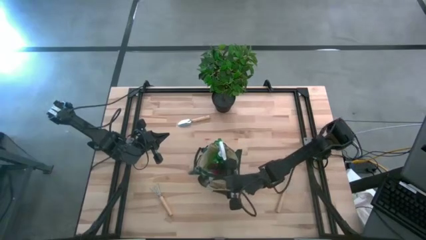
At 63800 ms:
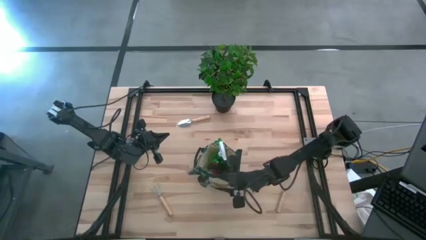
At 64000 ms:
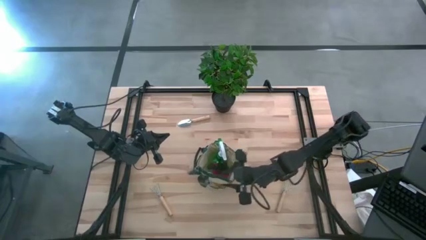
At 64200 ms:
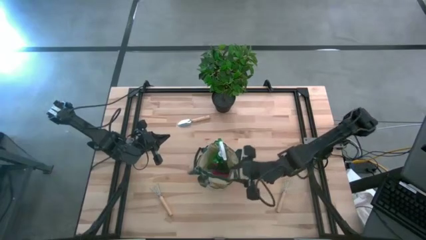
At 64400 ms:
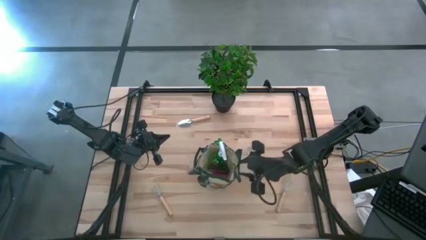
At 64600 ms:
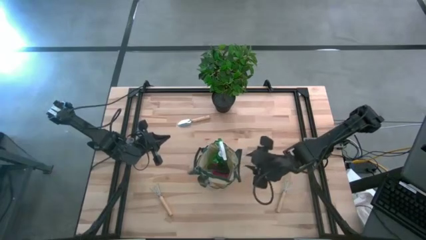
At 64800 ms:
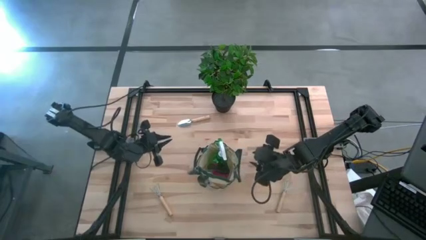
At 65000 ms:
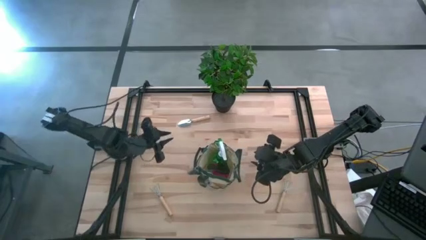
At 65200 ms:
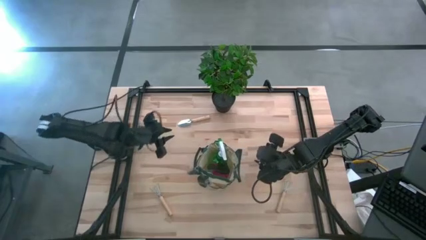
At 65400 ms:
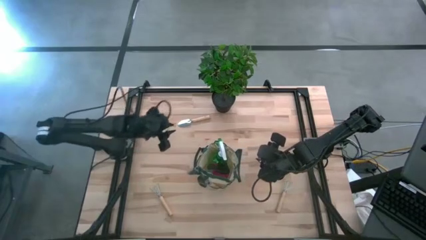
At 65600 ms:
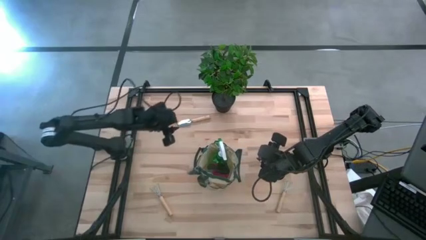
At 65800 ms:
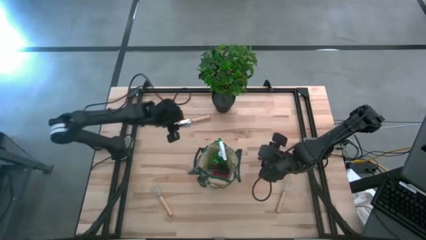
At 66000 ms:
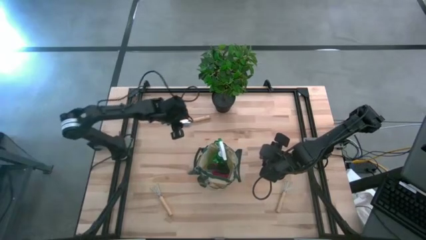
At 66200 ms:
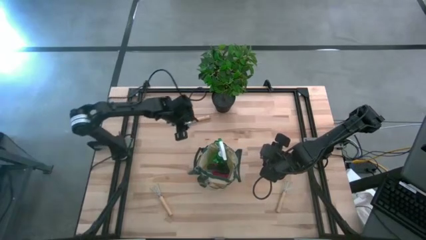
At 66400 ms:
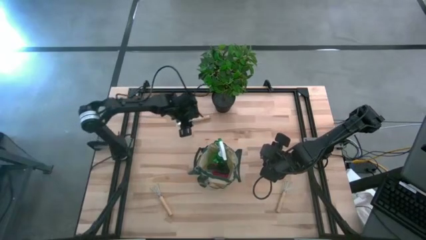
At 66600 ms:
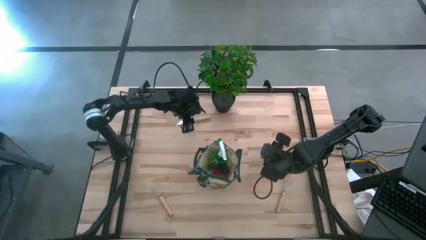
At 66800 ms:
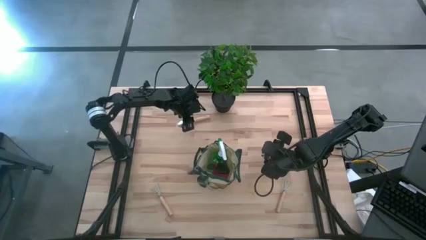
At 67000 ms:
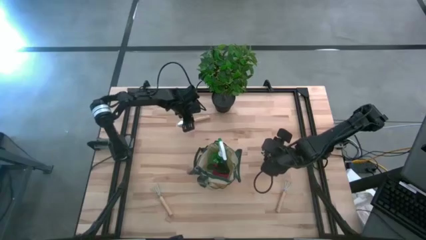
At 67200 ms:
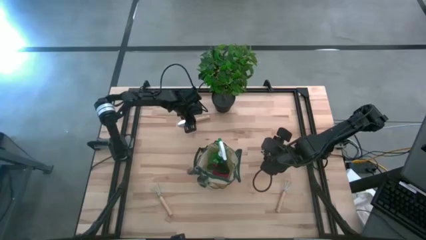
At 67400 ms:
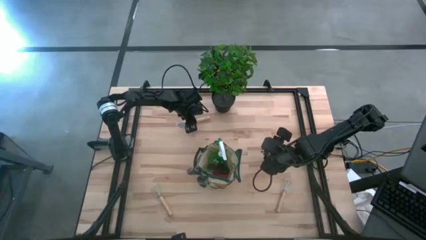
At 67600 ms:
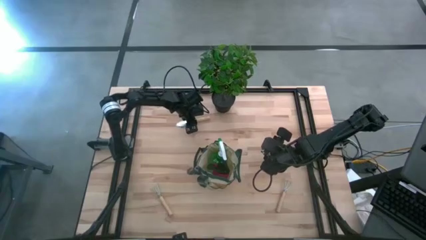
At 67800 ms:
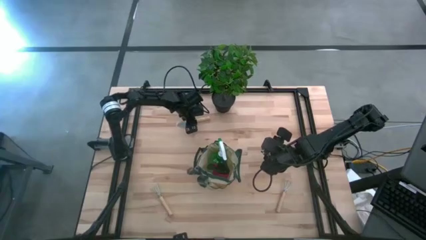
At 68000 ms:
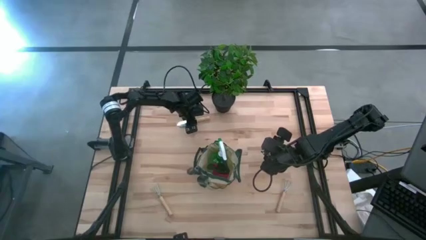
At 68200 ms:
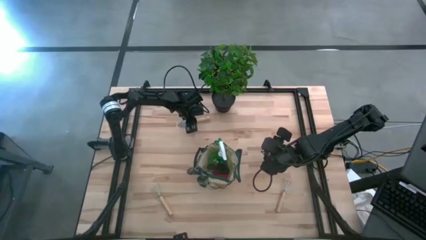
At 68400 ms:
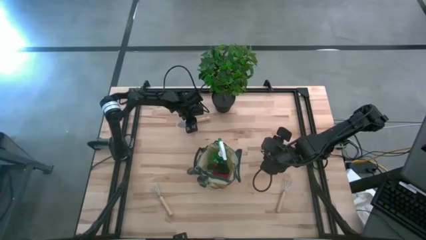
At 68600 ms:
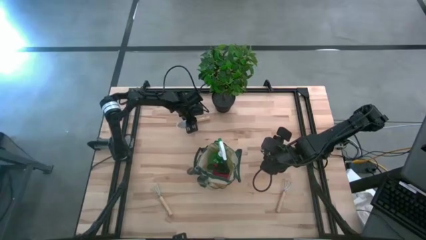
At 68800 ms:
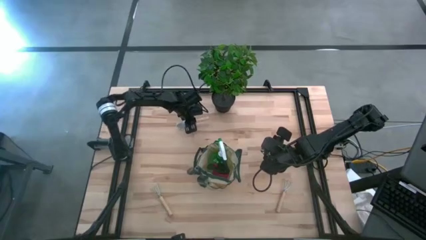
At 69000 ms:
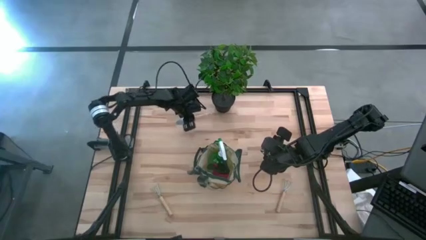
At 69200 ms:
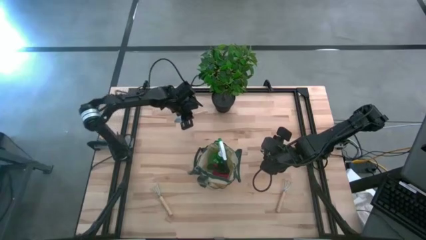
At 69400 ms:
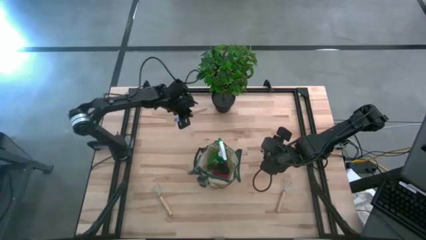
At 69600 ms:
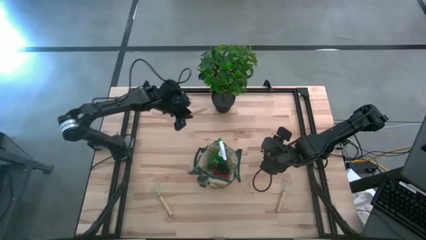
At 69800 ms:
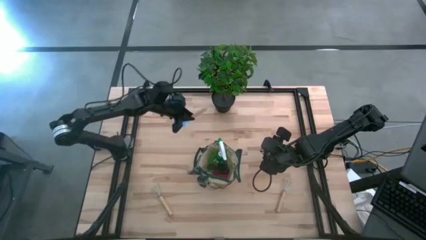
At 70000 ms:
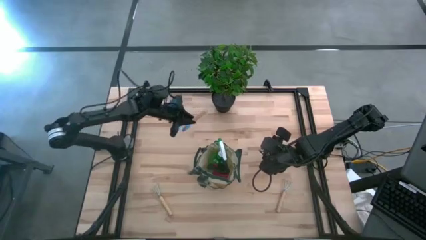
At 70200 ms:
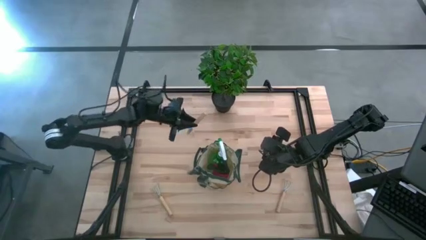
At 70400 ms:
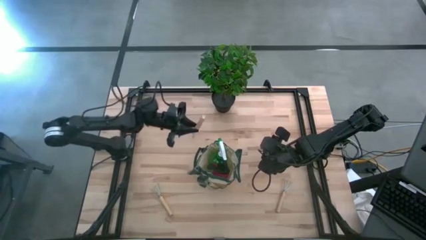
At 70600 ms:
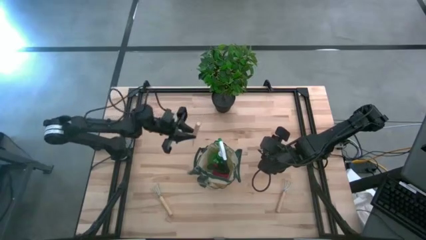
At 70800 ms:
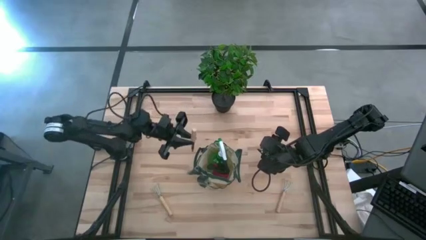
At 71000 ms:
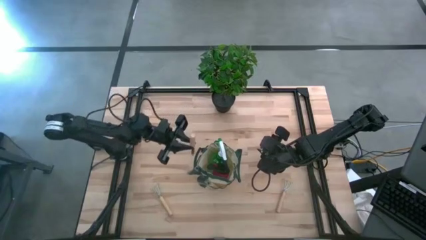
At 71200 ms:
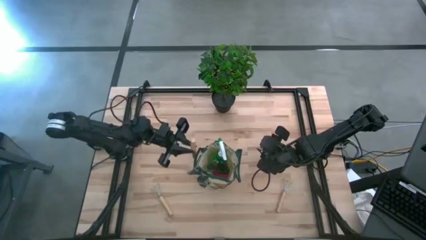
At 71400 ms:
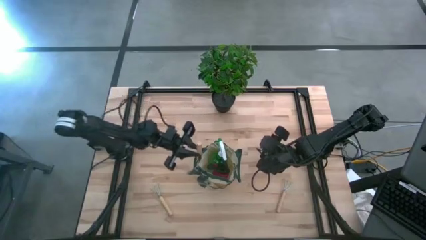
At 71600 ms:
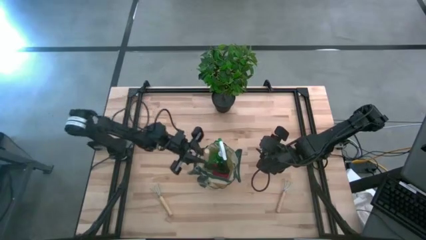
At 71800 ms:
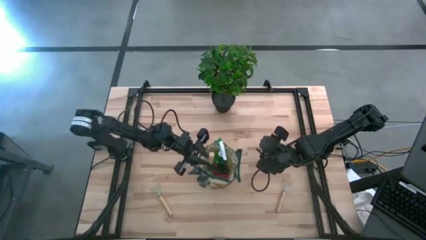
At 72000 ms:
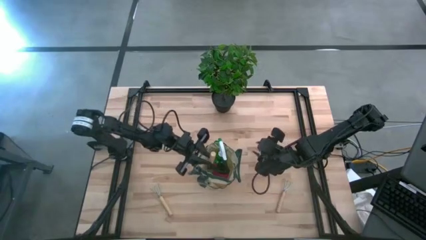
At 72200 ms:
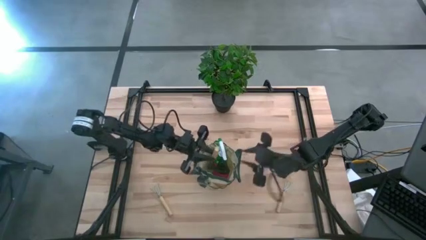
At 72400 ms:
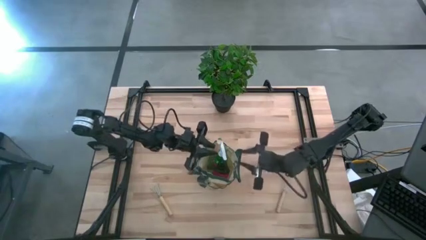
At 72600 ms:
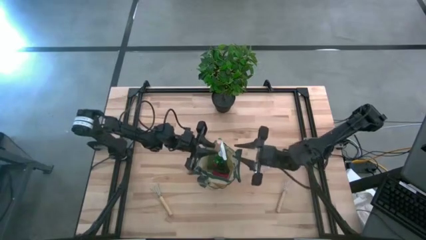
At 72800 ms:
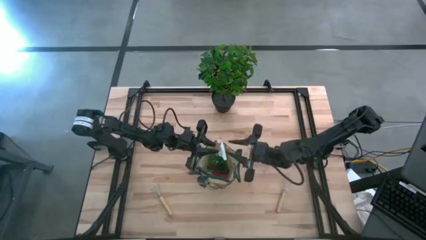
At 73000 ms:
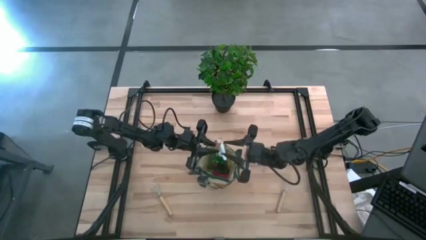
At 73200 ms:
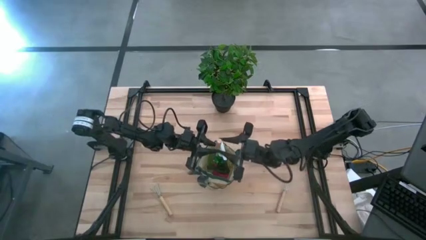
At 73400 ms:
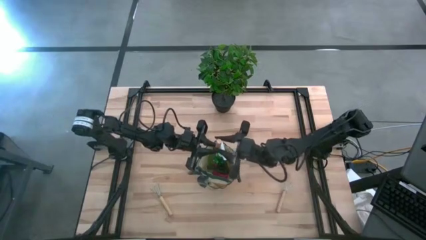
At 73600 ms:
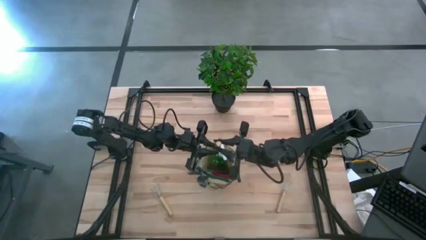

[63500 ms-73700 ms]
Task: Pick & Place Garden tools in Gardening bag
Put the brown trowel into the green gardening bag
